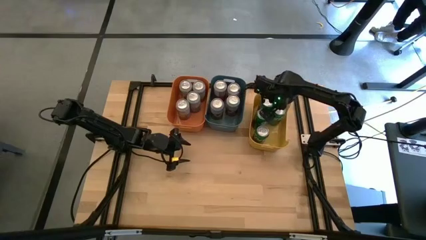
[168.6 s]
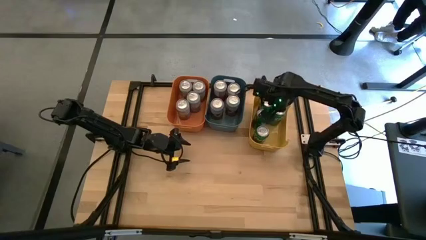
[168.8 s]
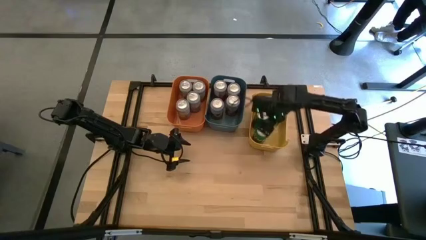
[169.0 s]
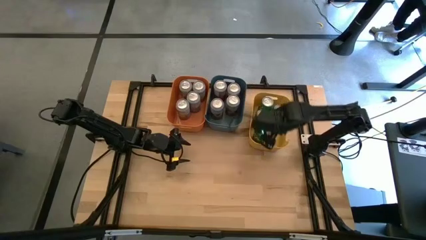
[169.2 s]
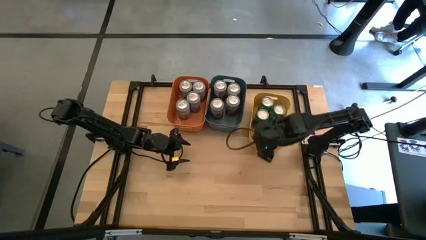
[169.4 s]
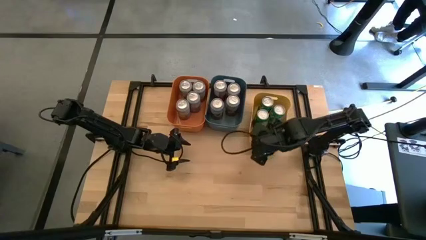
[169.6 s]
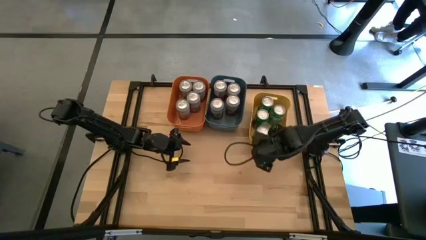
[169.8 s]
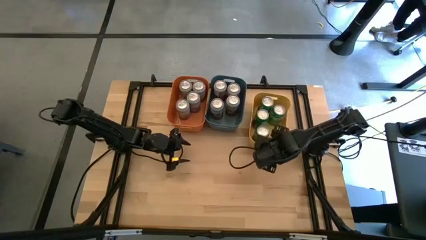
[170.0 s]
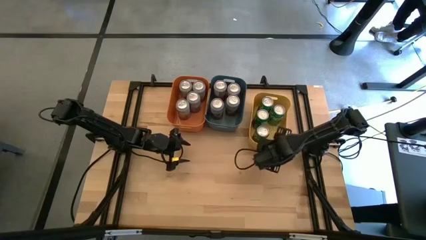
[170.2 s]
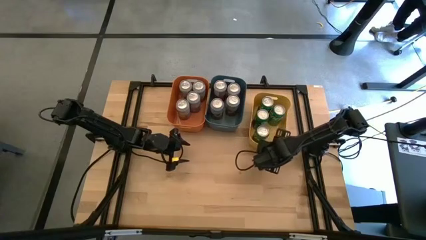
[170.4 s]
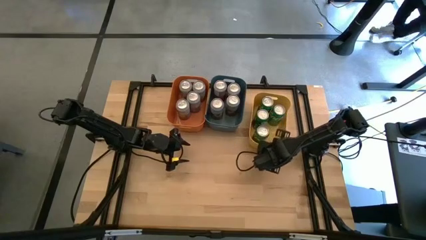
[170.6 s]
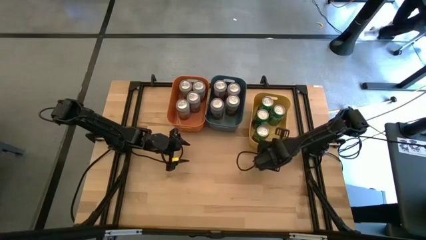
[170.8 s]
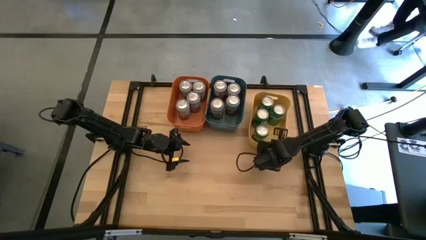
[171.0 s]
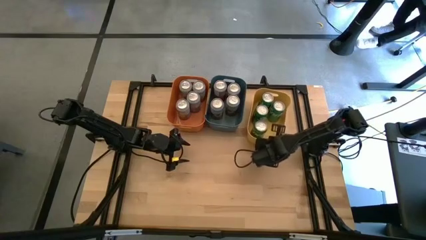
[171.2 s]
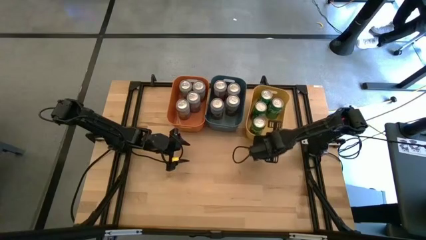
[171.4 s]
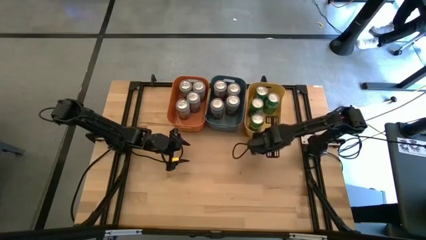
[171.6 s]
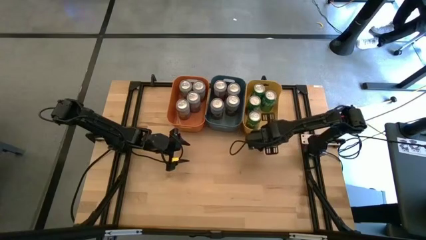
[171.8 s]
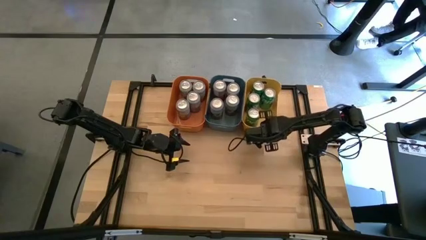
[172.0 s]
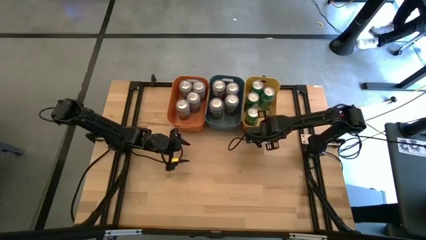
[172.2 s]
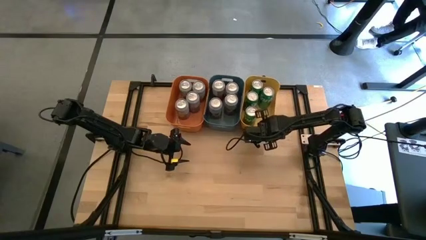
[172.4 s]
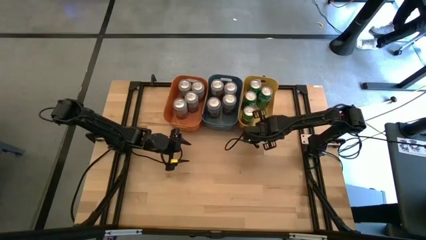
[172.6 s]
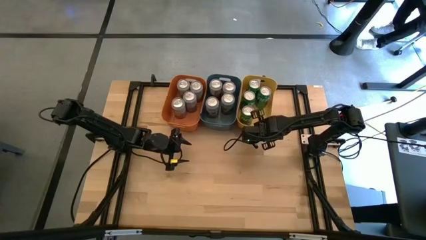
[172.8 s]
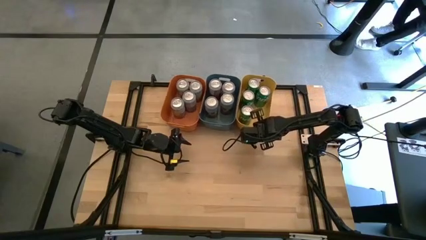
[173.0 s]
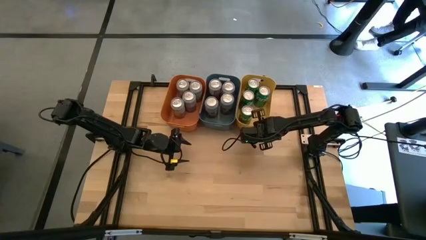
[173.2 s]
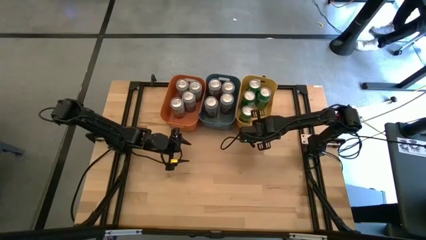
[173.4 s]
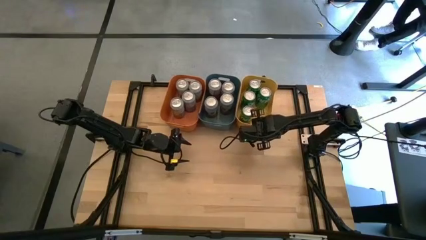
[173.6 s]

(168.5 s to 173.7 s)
Task: Sort soda cans
Adjust the yellow bin

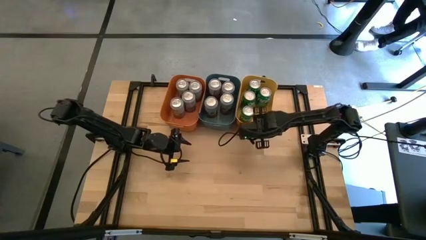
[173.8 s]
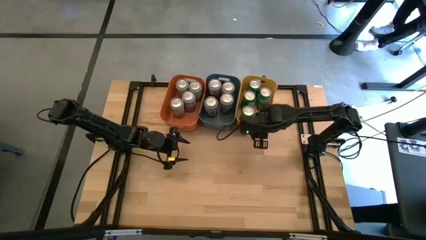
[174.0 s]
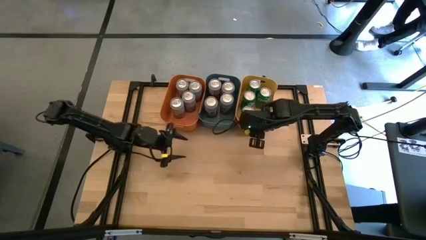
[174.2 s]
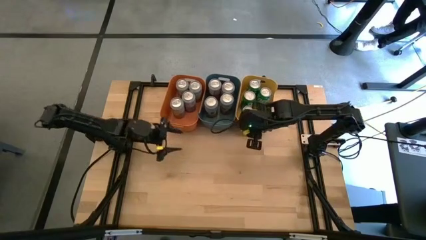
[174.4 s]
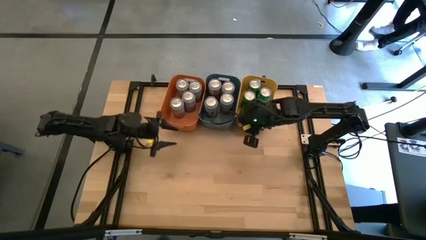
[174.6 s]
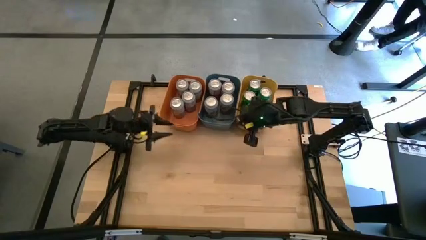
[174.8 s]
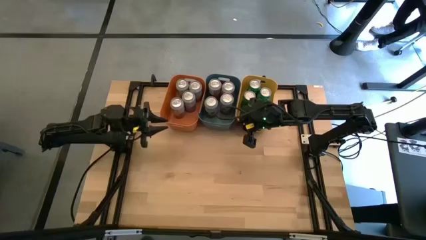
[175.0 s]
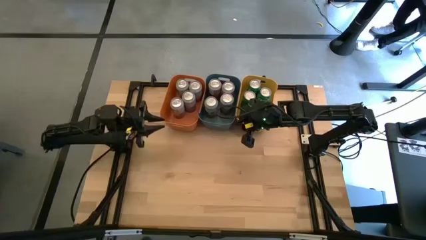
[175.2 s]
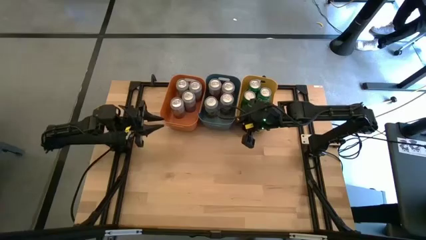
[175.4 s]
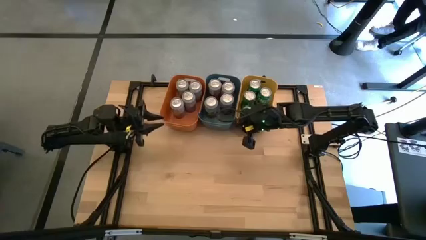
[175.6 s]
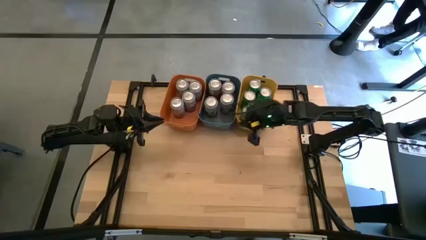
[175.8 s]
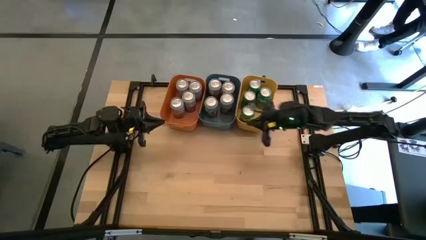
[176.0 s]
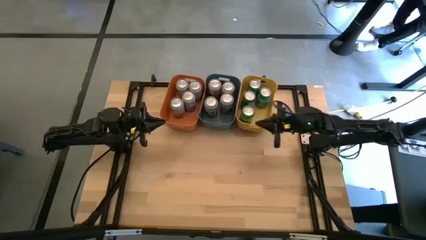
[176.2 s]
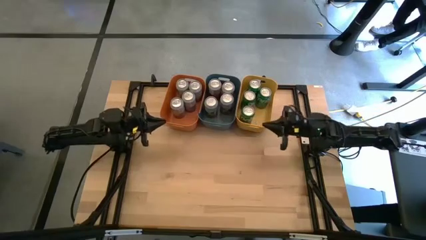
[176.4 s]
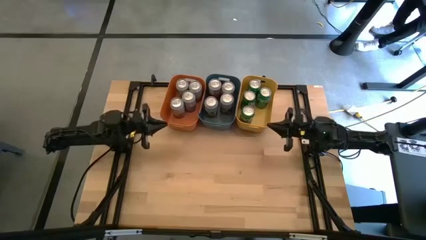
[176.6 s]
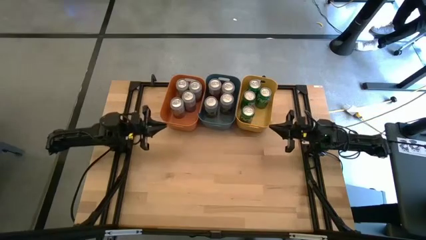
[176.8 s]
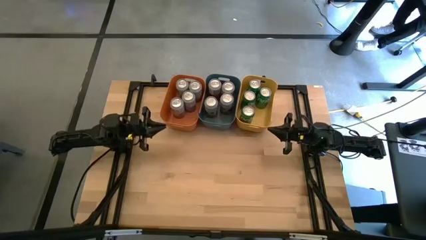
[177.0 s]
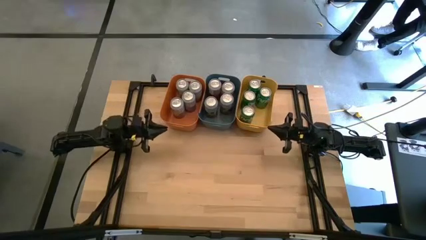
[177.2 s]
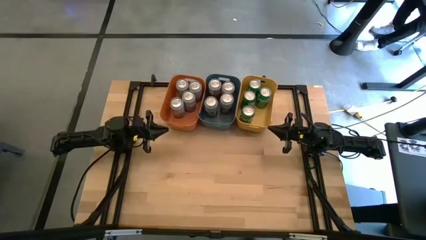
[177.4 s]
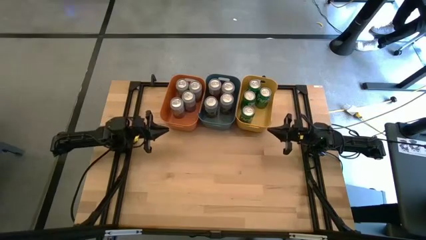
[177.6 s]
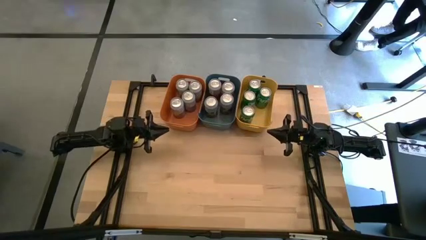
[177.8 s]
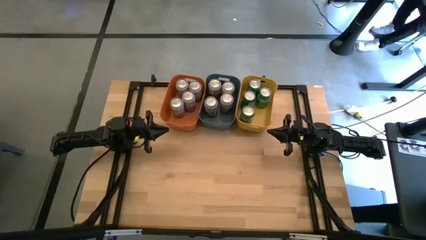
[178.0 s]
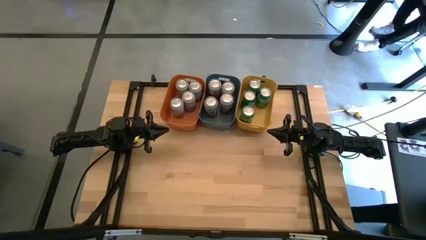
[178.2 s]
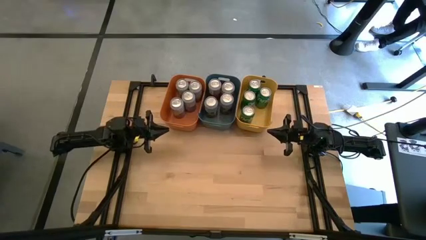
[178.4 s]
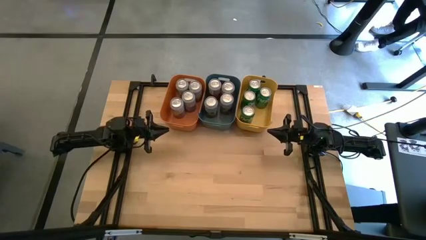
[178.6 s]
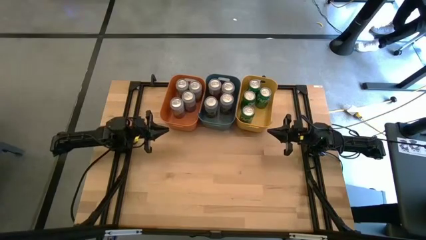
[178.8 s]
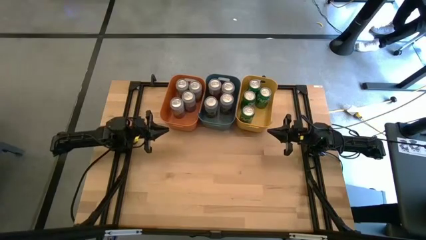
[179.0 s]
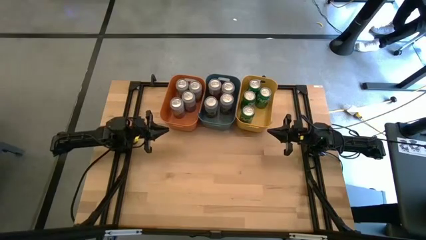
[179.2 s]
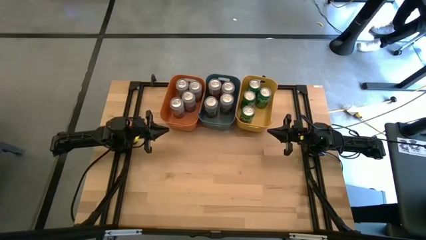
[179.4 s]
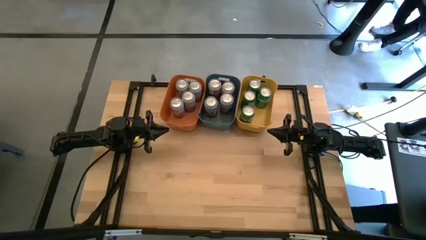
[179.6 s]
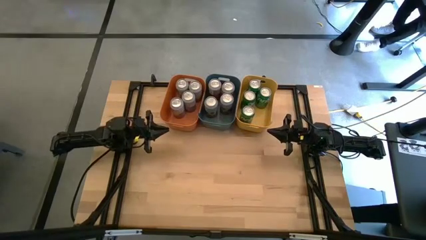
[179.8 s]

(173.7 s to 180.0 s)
Return to Home Position
